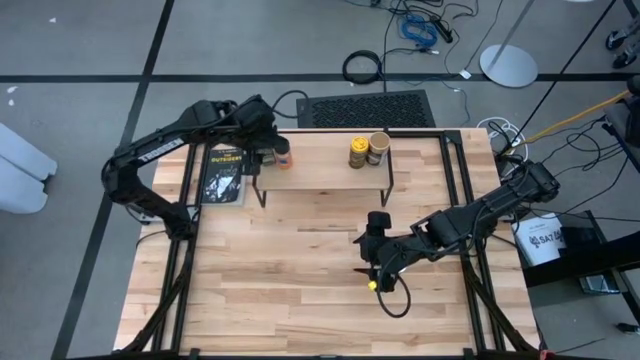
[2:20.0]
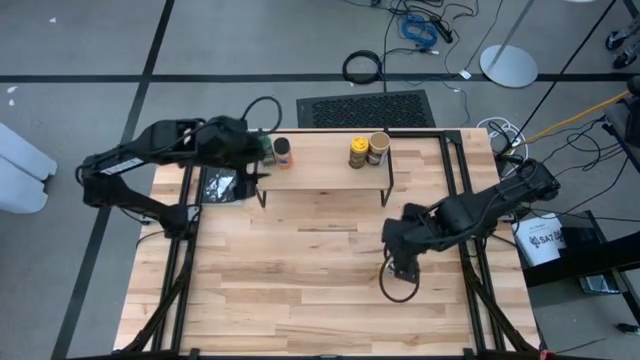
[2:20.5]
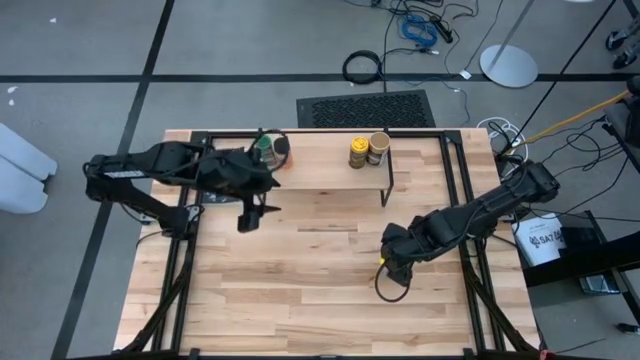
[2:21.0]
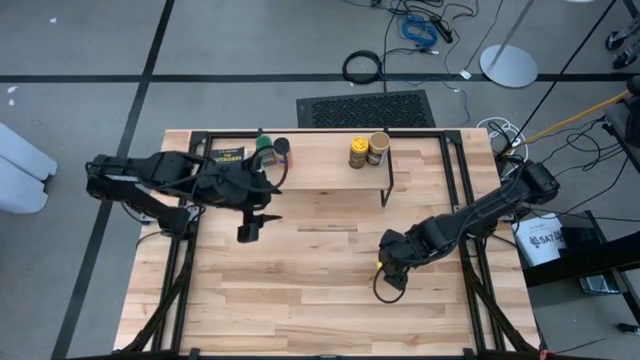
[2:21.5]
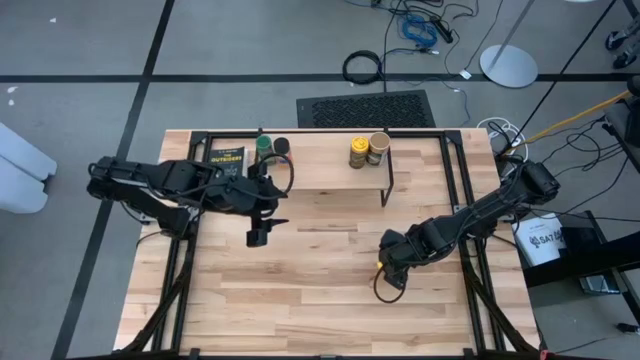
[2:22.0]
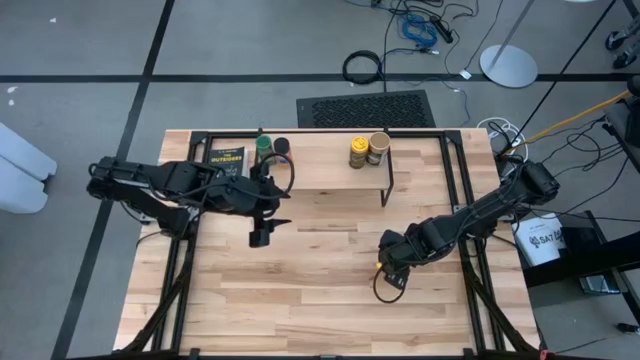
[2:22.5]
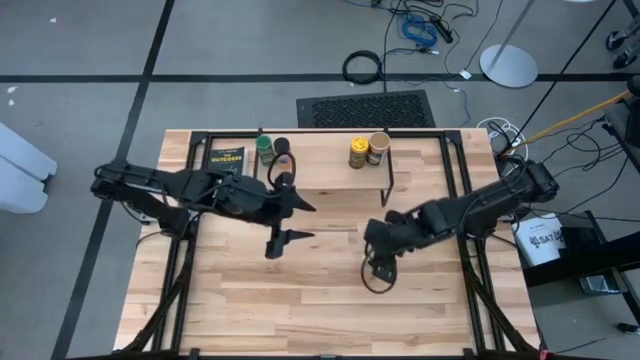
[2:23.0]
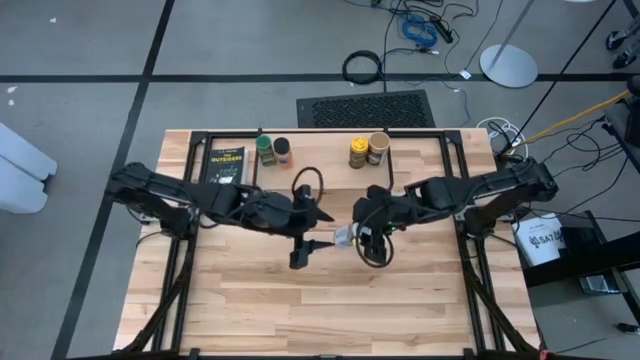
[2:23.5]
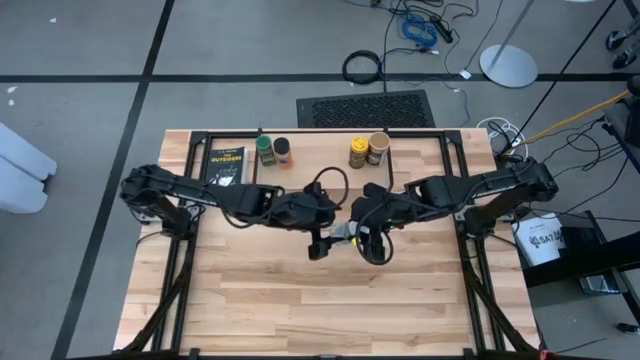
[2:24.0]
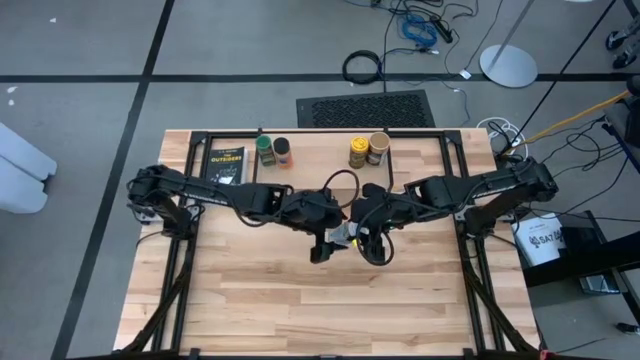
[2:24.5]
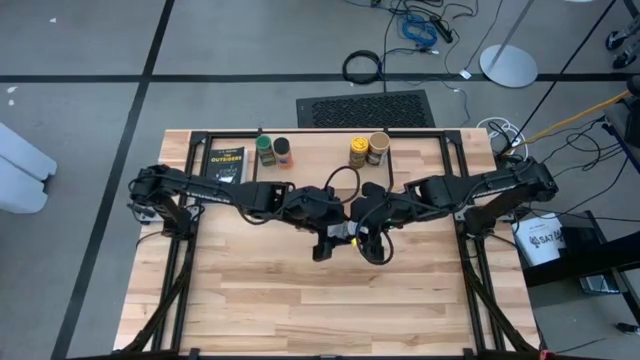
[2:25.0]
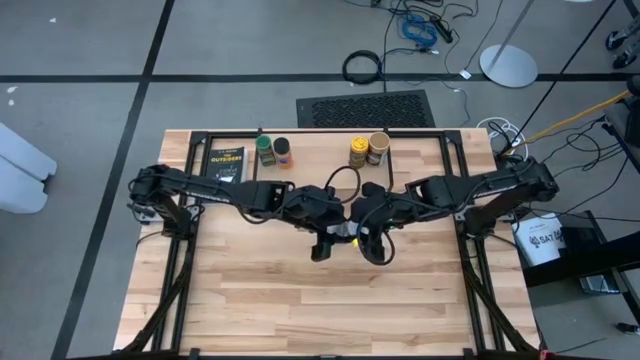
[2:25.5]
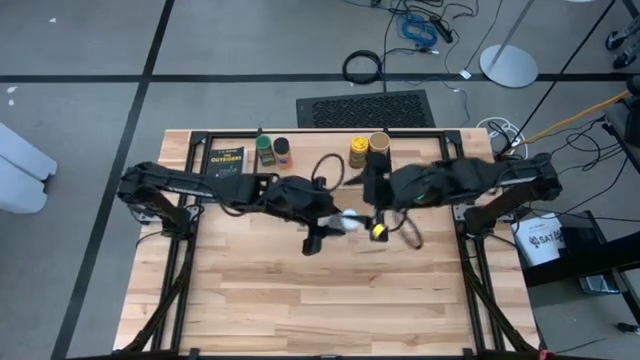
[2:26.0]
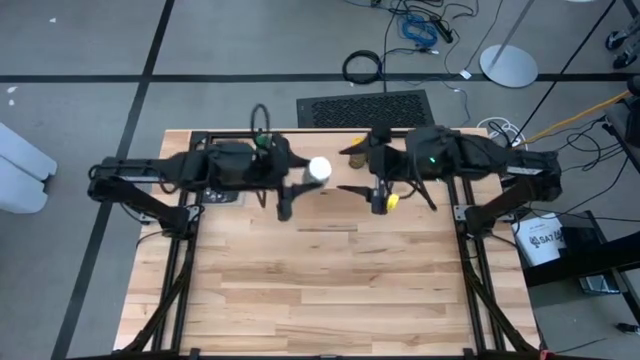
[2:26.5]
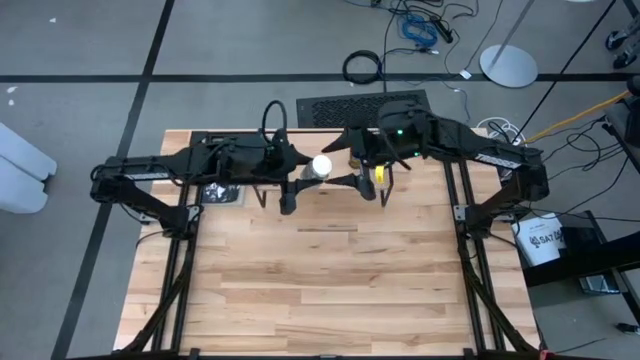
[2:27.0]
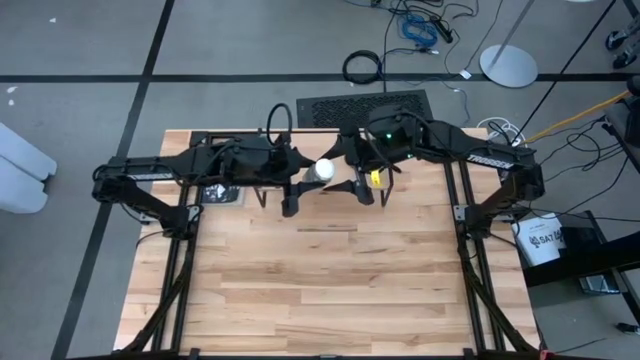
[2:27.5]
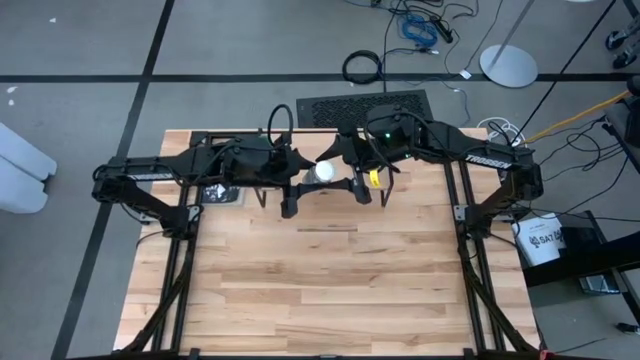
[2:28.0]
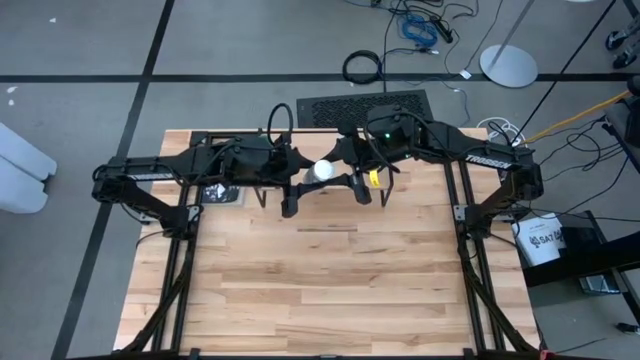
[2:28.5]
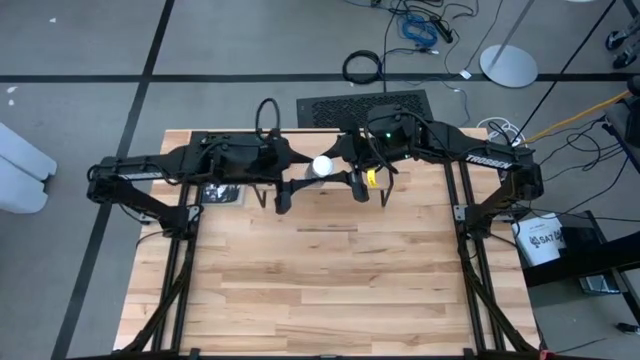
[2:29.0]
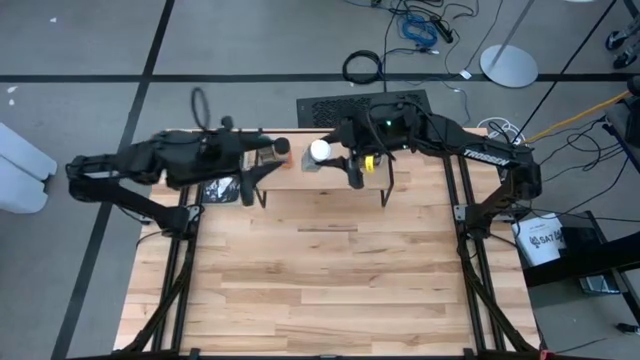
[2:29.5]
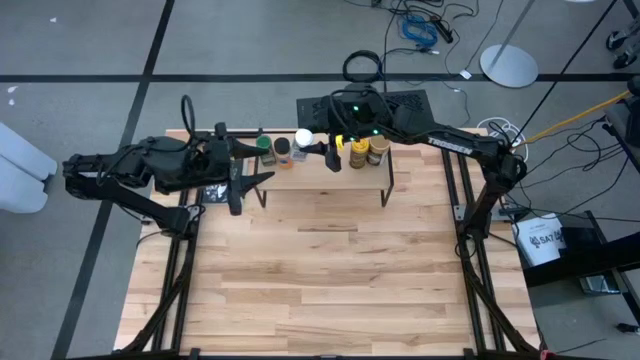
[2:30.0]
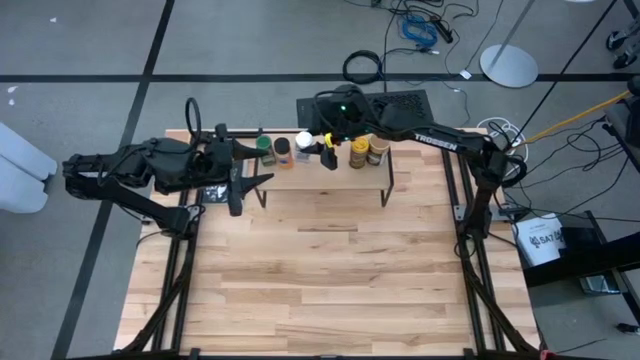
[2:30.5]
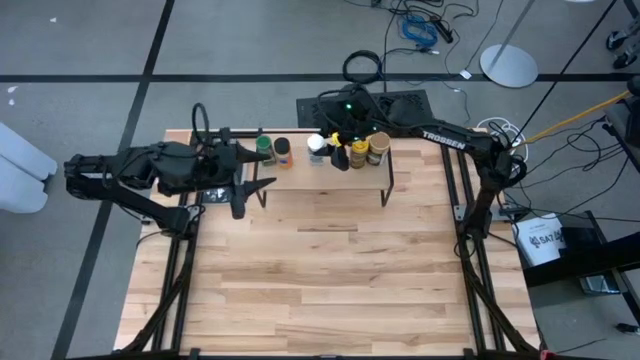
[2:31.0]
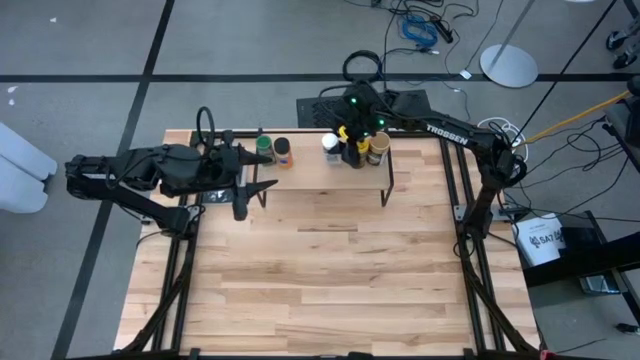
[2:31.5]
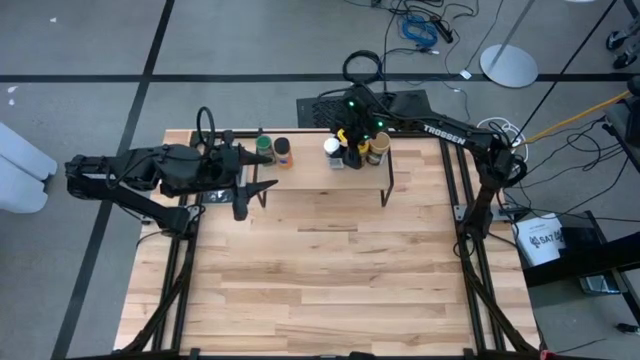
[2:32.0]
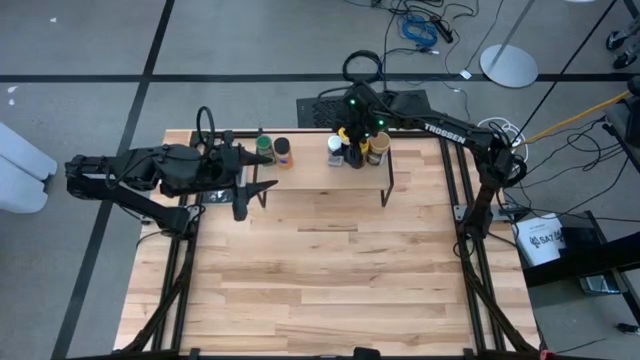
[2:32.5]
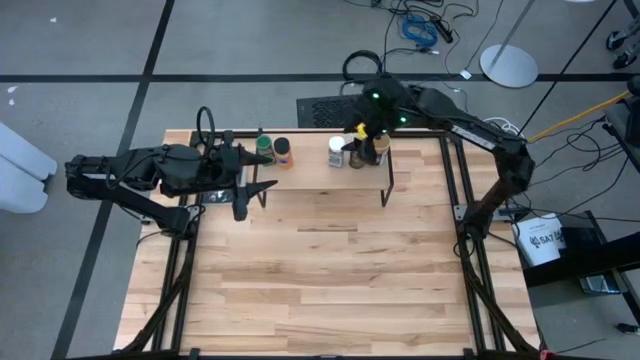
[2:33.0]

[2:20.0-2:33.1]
Task: Shelf spices
Put the white seasoning bottle on the shelf
